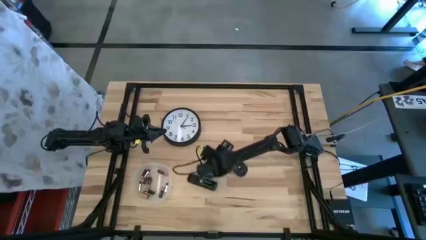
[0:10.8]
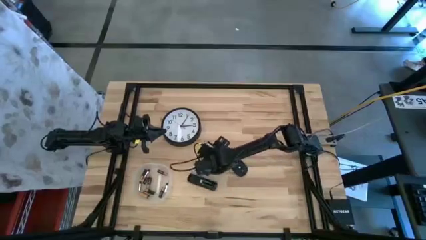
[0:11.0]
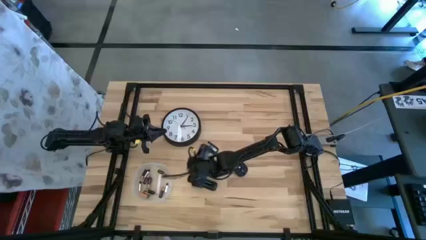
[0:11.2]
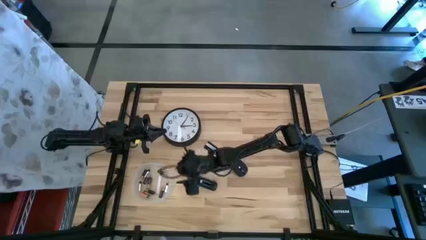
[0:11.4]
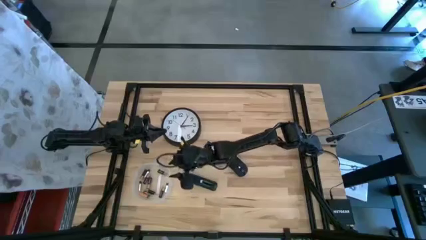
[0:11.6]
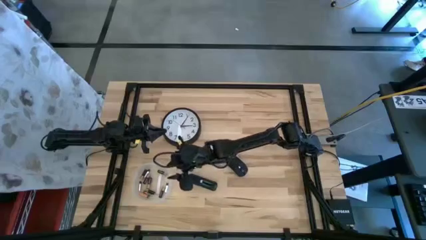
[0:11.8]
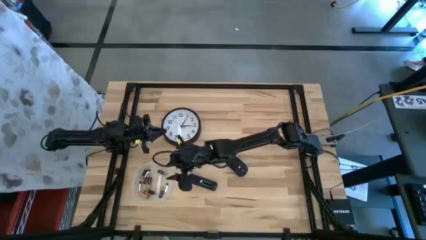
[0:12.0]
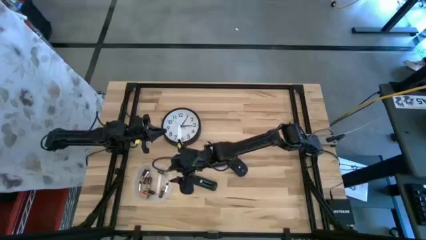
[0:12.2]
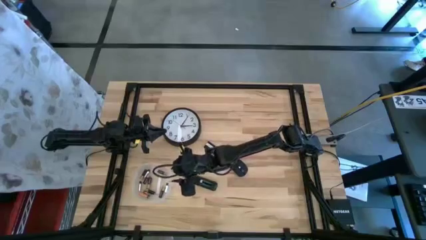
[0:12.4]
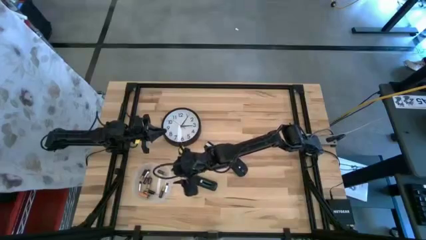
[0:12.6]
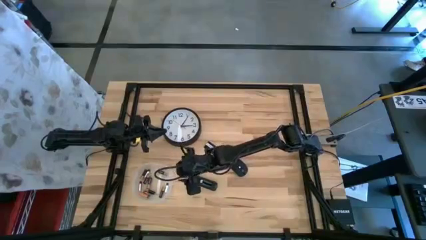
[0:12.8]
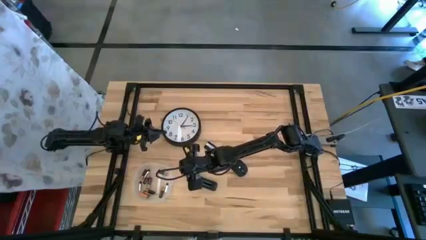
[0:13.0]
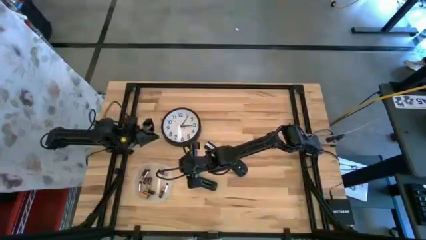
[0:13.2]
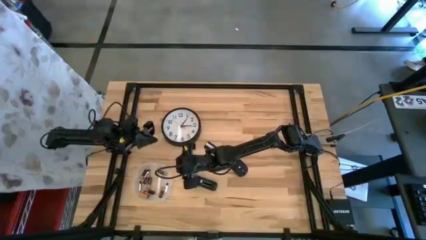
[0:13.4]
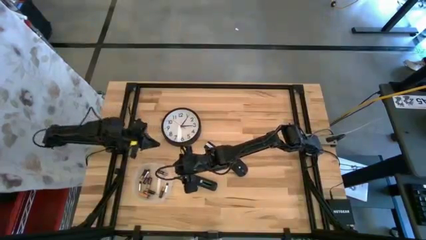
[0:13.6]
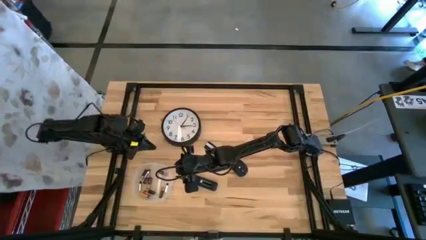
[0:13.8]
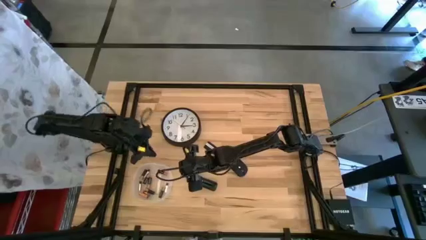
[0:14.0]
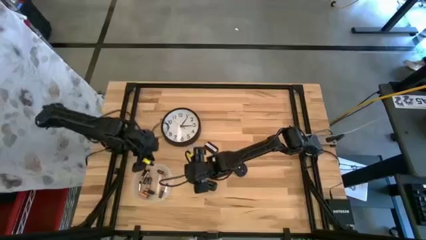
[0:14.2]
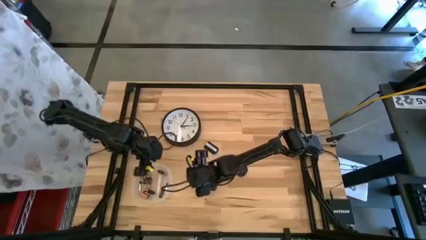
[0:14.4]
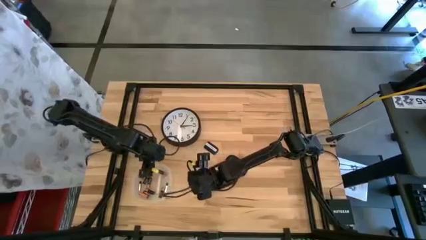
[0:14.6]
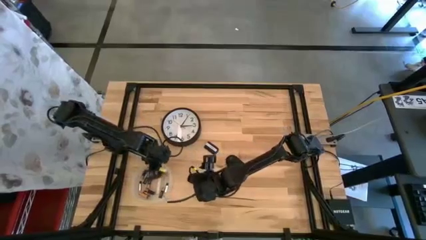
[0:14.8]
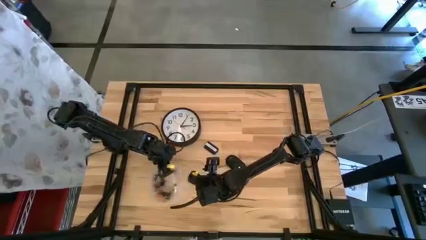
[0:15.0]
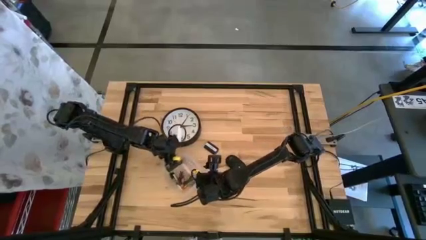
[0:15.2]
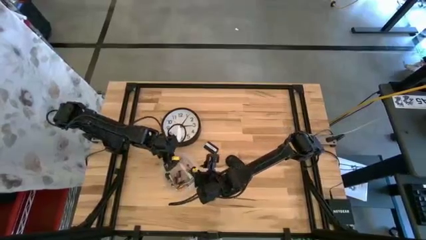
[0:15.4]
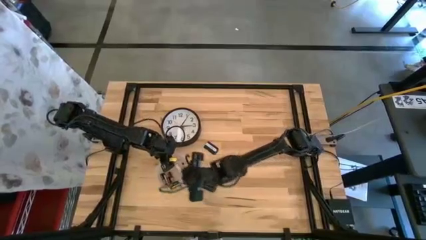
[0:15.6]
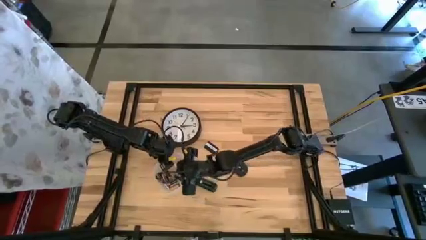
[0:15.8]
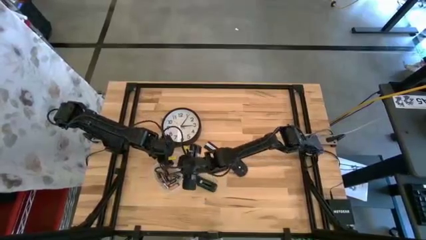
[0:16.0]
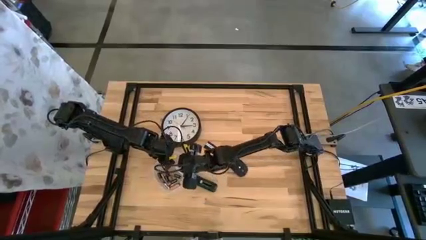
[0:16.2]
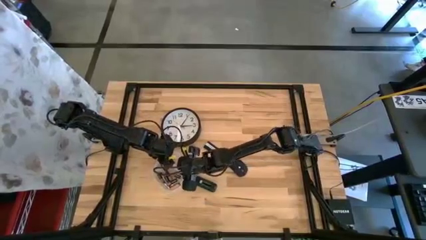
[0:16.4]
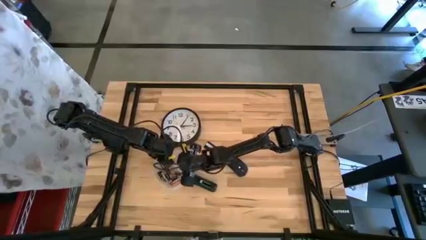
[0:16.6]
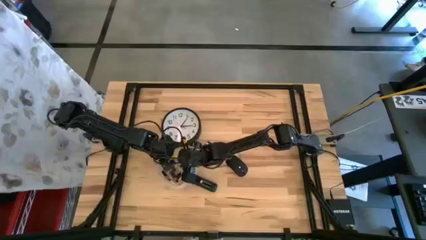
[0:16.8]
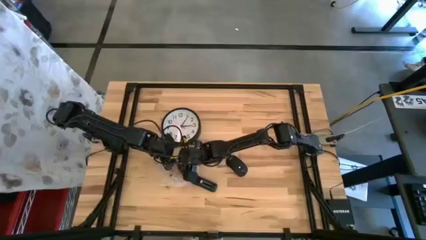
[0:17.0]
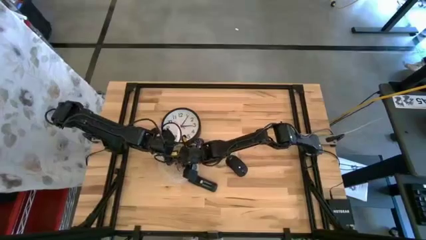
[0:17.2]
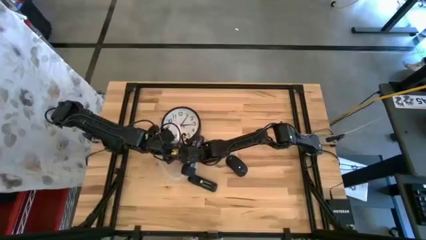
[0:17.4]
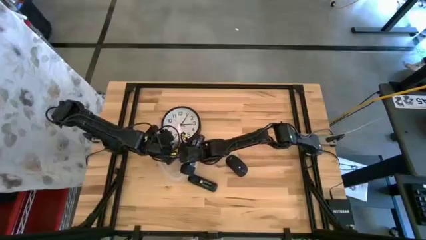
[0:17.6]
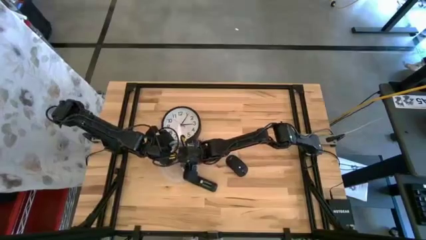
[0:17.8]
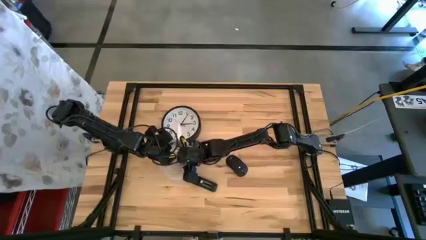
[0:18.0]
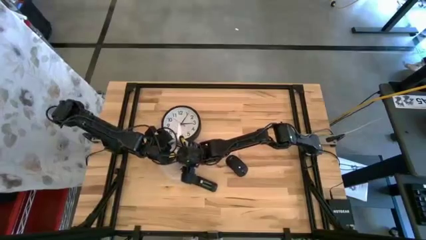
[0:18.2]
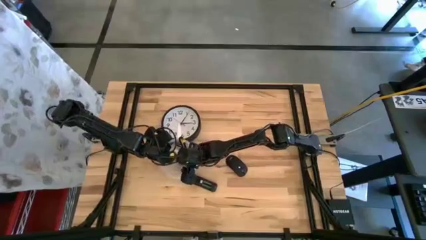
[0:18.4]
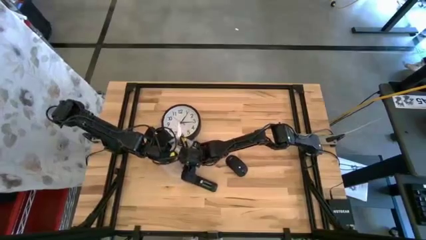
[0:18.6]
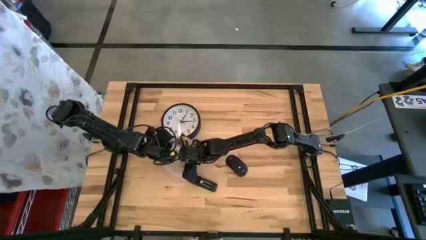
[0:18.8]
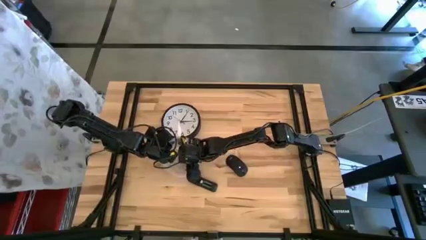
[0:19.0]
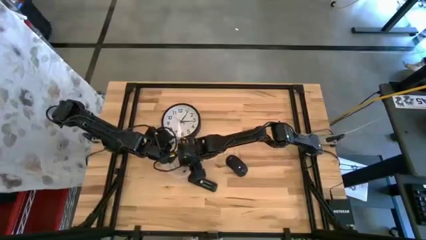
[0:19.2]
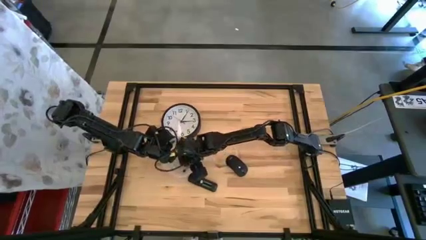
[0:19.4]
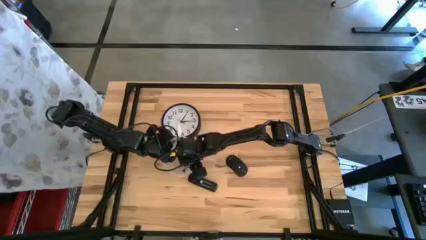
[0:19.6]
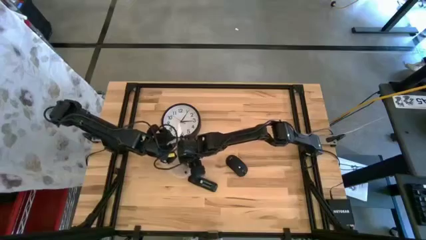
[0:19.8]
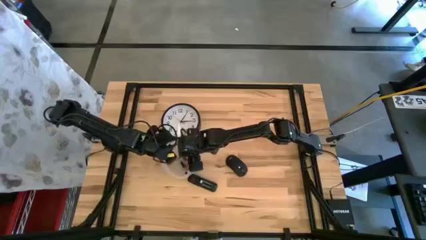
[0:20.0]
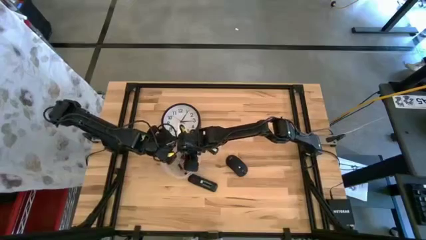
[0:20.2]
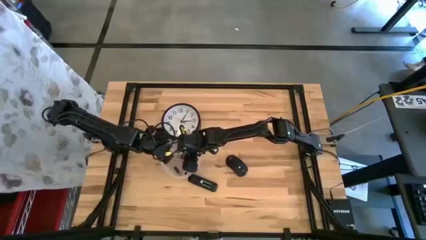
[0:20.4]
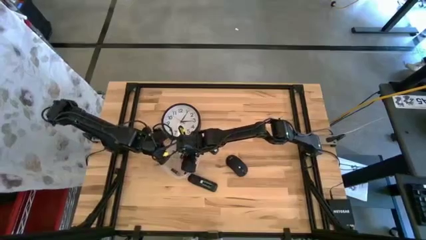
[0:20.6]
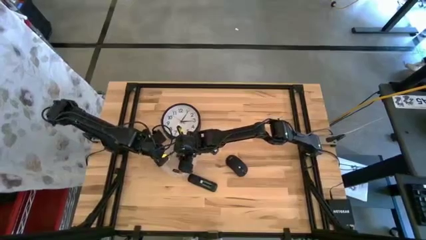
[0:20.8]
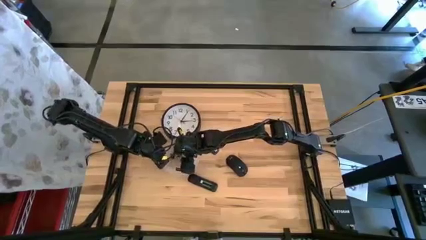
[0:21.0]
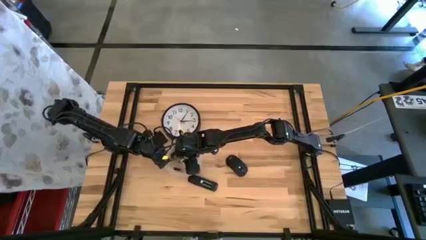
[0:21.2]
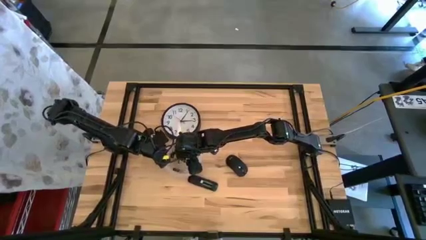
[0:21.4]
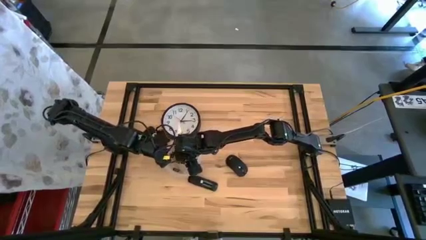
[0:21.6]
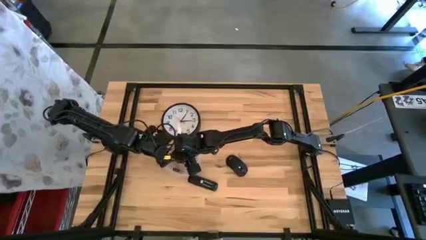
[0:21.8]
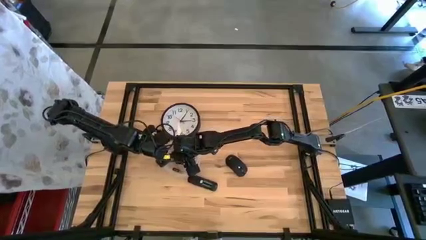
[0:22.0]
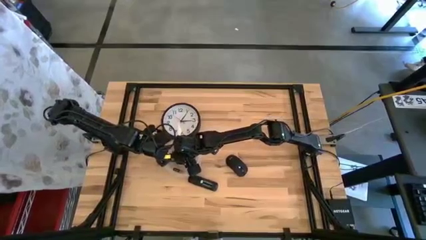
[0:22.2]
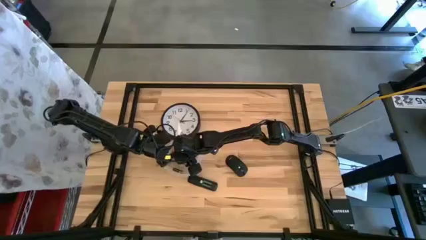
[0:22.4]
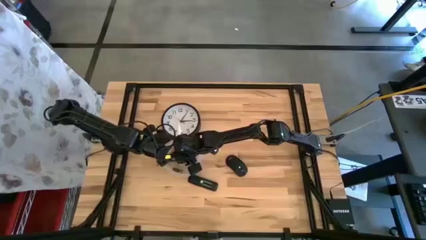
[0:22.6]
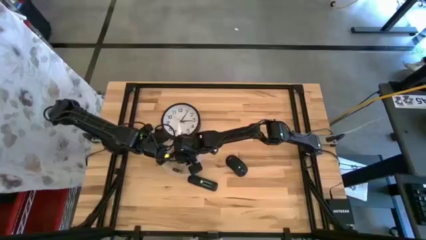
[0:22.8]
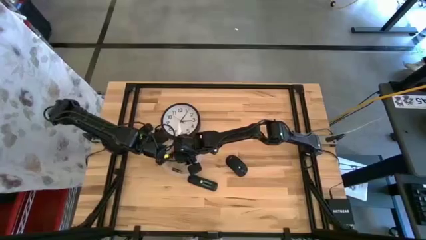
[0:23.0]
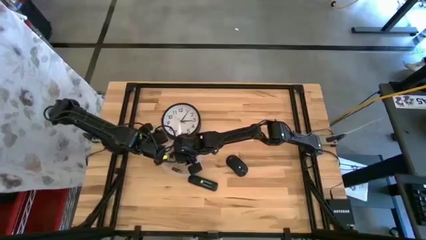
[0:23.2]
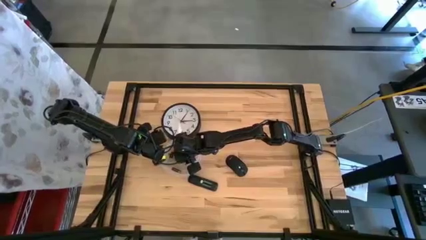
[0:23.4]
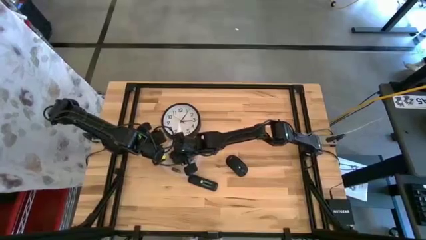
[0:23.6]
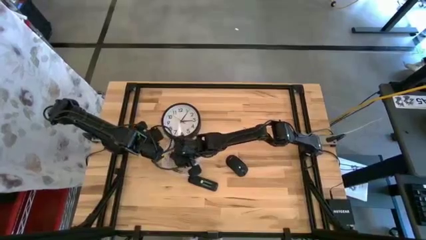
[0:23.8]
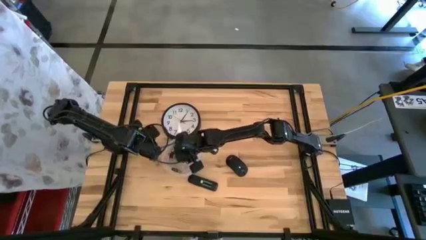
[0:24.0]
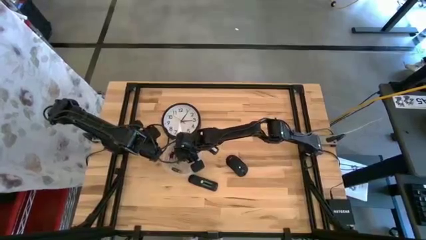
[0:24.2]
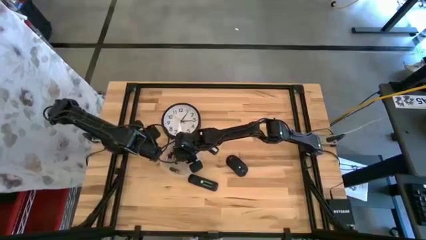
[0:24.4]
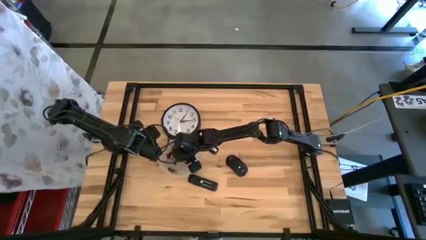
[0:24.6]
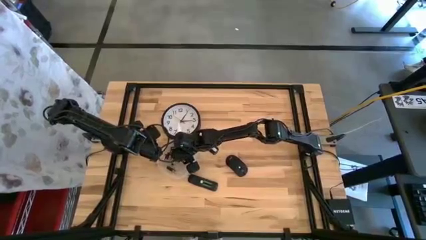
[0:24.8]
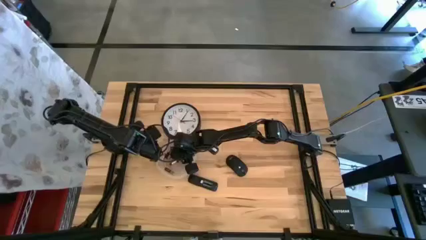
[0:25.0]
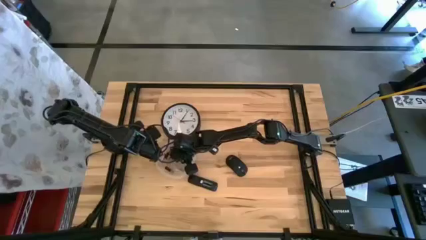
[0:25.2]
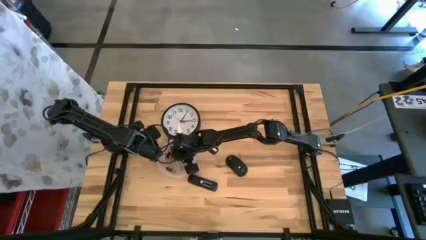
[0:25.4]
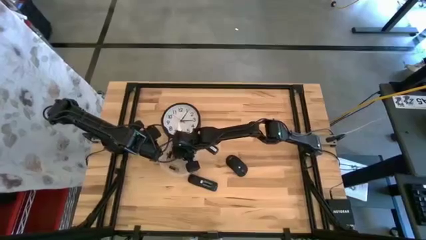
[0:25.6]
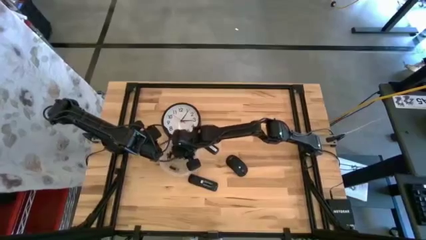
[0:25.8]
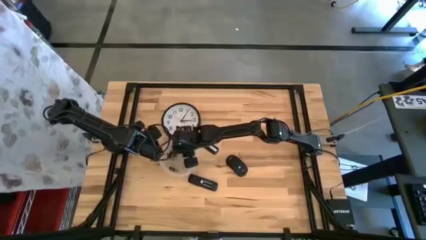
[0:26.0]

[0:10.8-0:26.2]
Task: Insert battery
Insert the silver battery into the remote control
